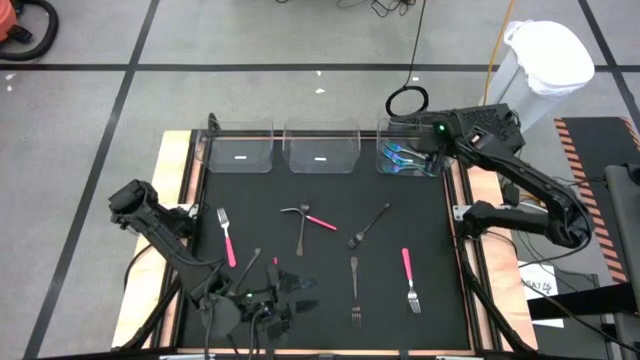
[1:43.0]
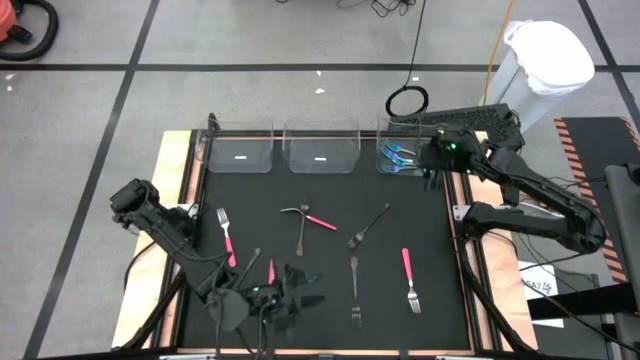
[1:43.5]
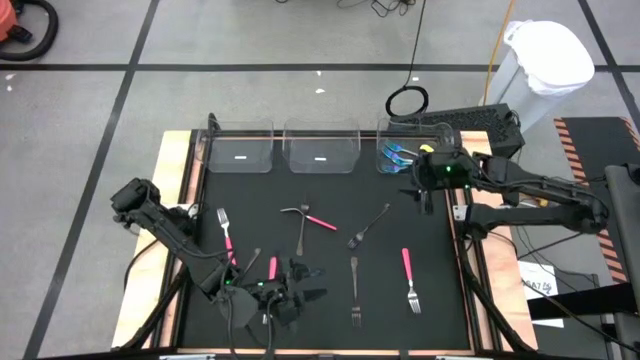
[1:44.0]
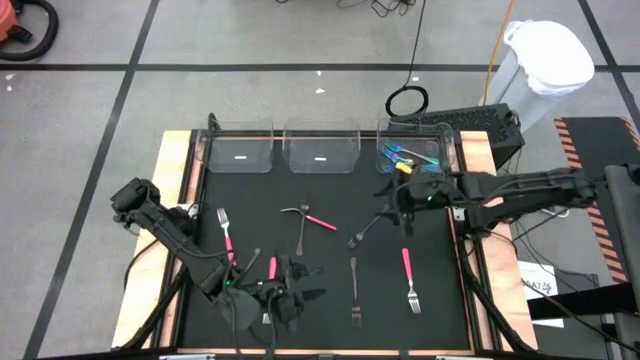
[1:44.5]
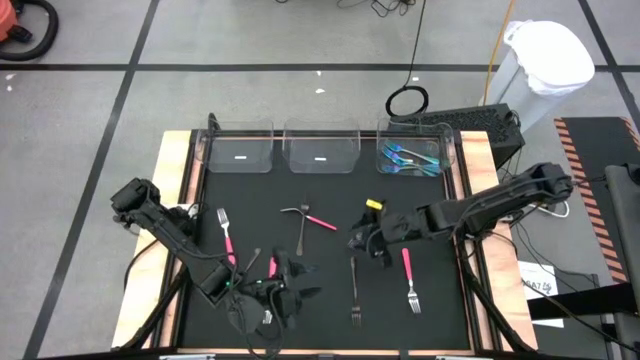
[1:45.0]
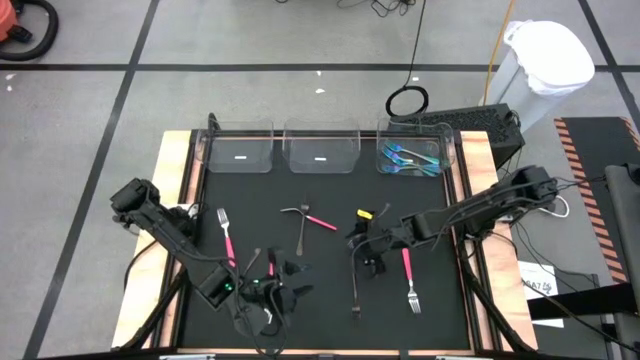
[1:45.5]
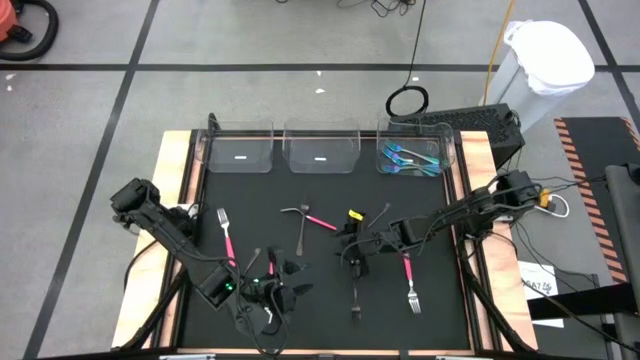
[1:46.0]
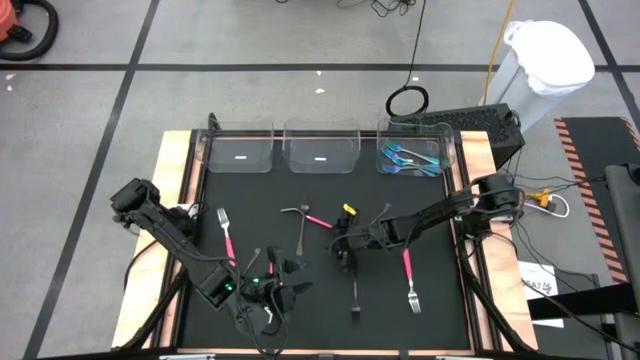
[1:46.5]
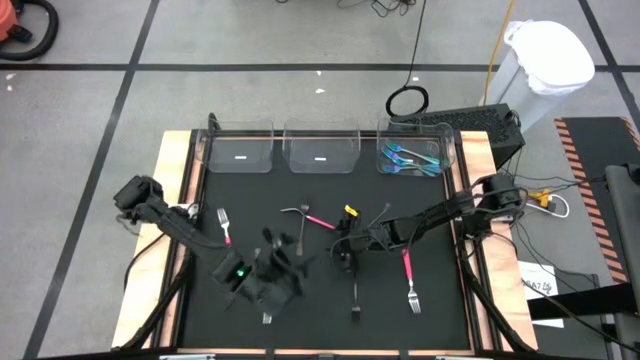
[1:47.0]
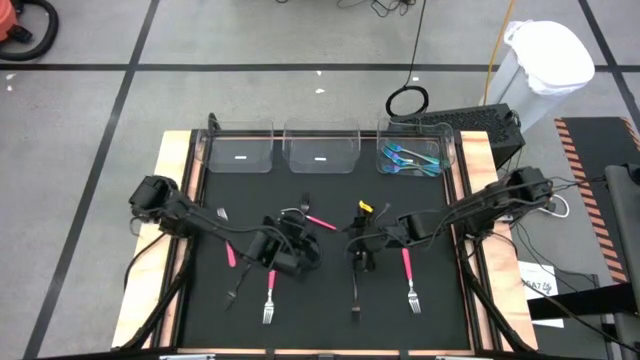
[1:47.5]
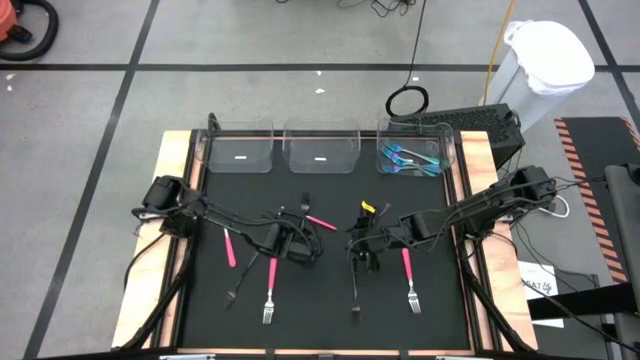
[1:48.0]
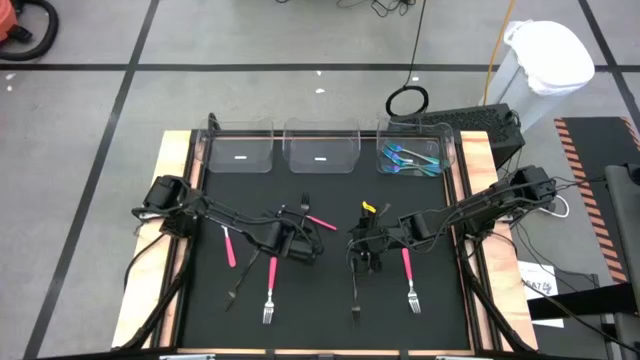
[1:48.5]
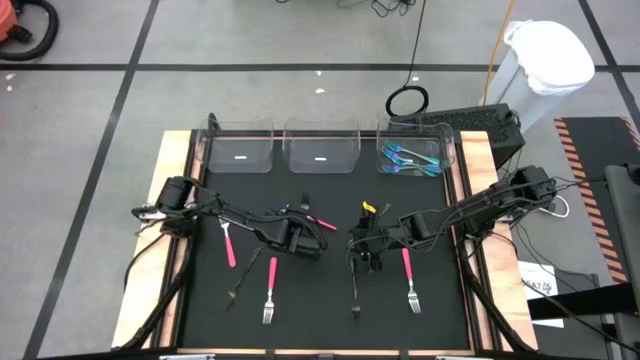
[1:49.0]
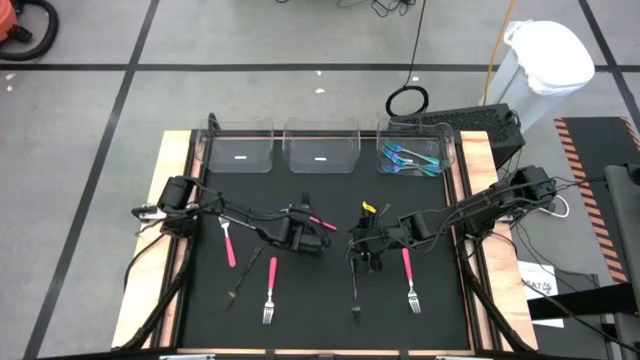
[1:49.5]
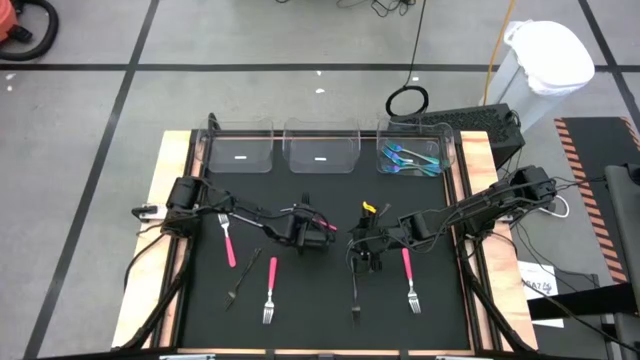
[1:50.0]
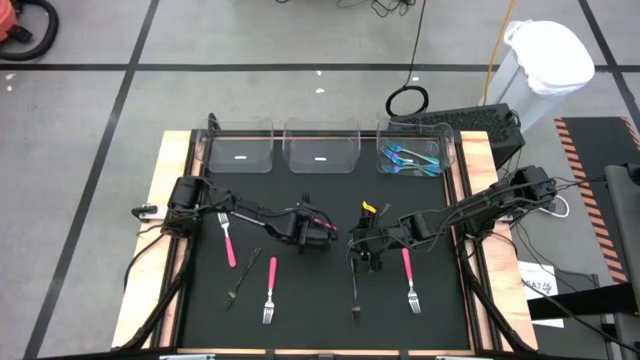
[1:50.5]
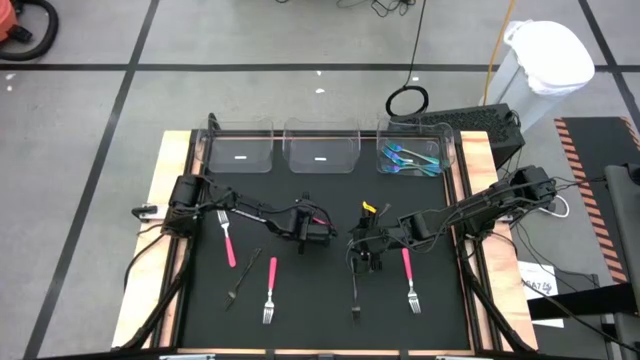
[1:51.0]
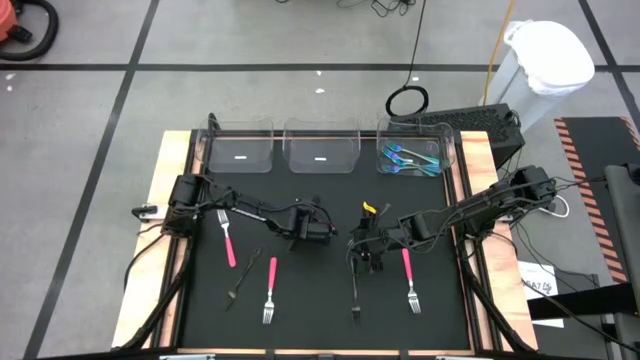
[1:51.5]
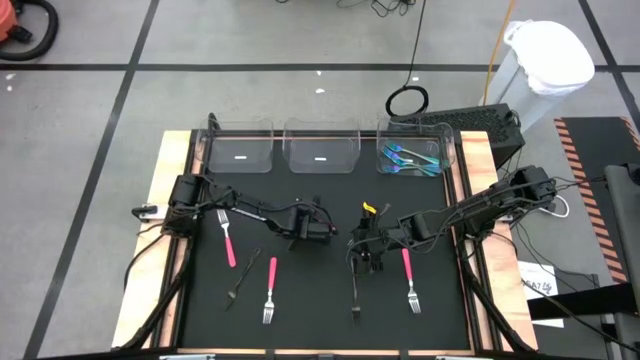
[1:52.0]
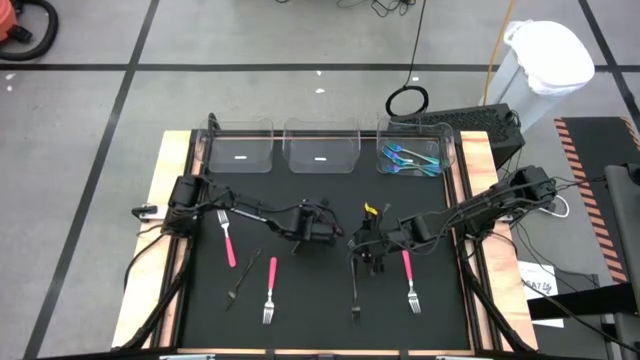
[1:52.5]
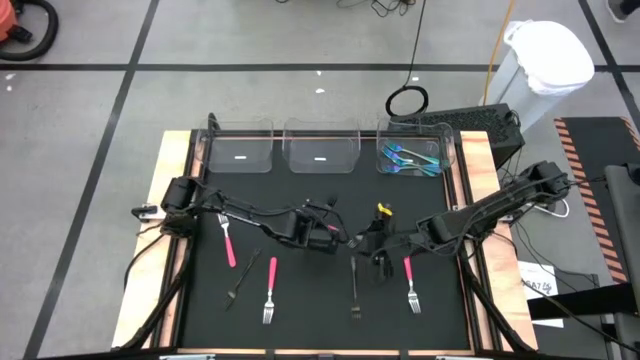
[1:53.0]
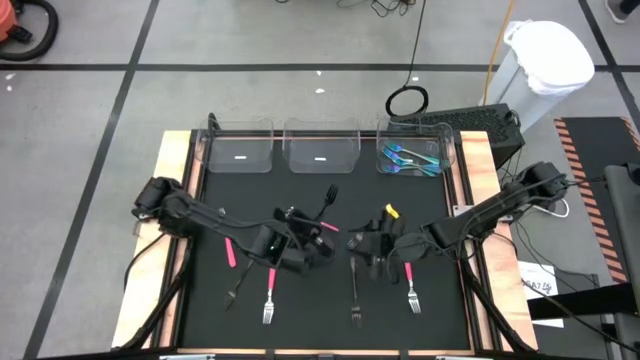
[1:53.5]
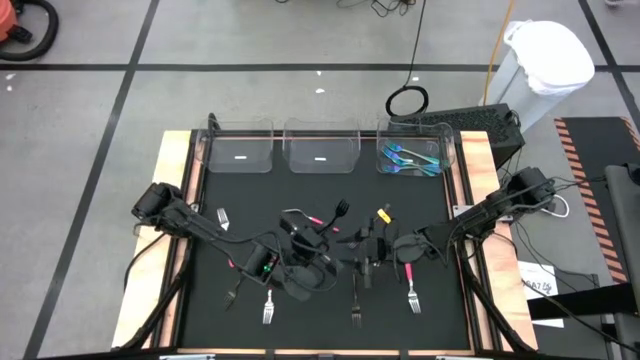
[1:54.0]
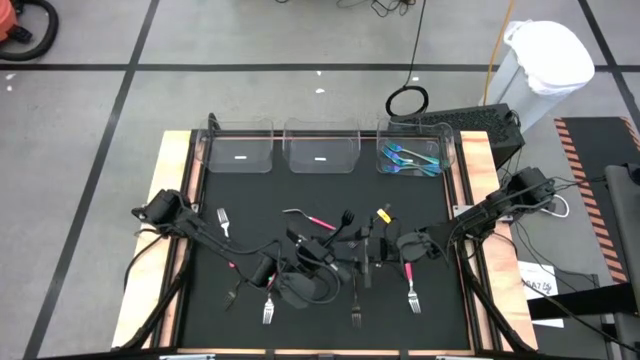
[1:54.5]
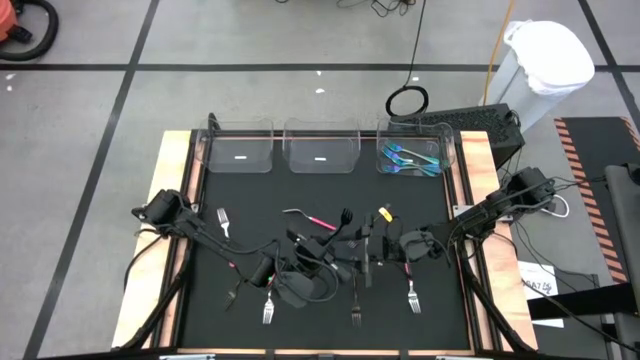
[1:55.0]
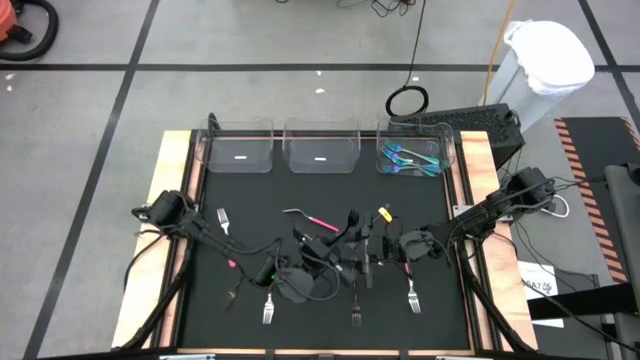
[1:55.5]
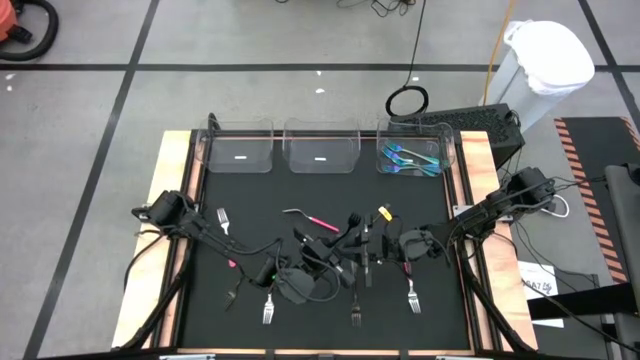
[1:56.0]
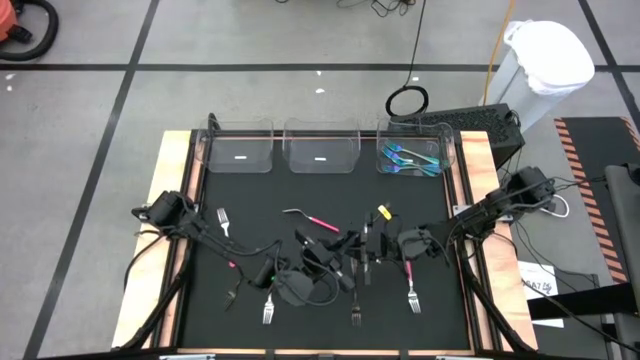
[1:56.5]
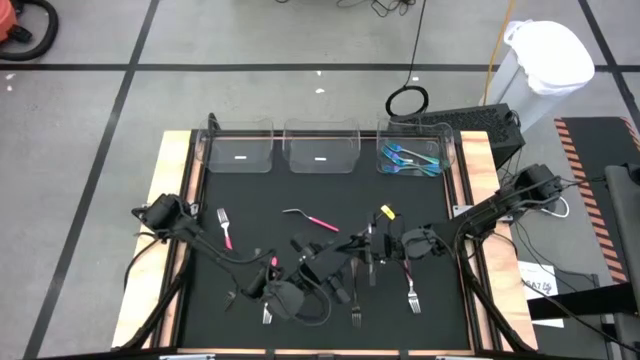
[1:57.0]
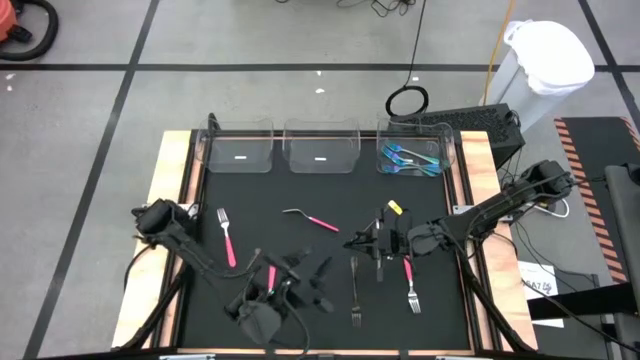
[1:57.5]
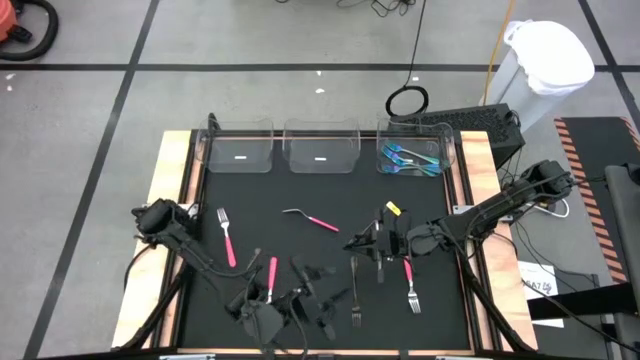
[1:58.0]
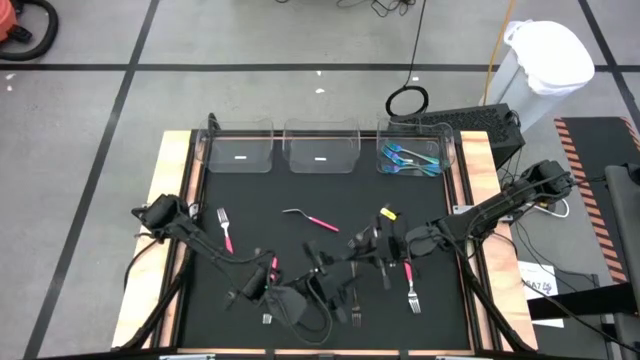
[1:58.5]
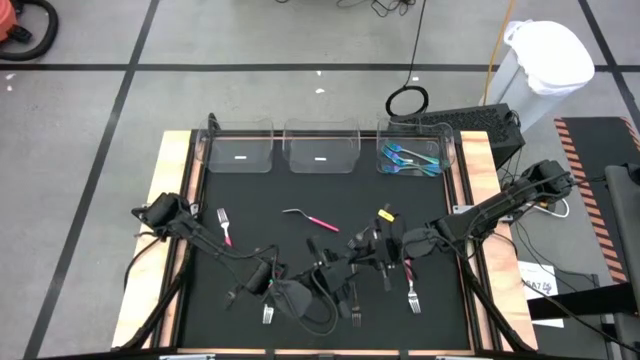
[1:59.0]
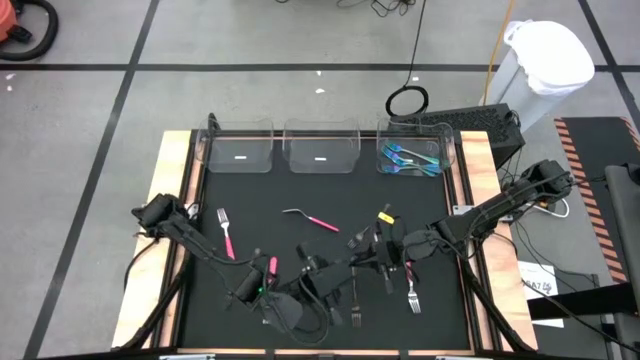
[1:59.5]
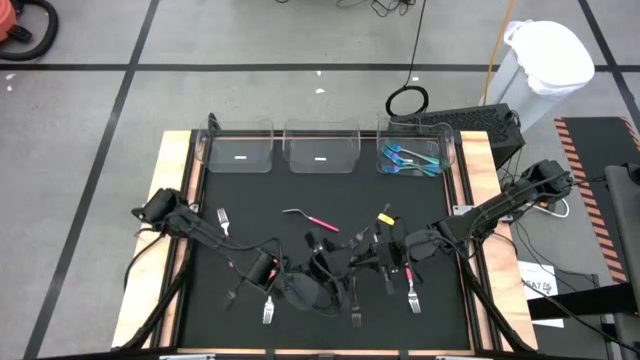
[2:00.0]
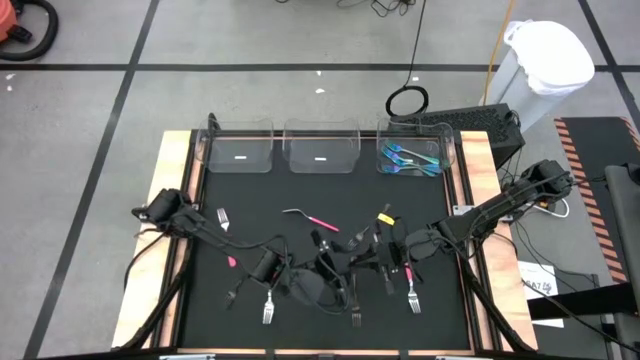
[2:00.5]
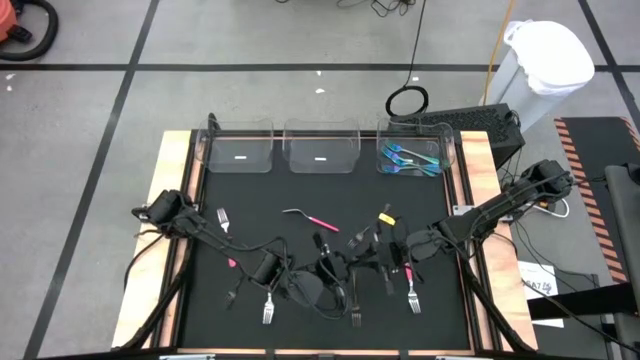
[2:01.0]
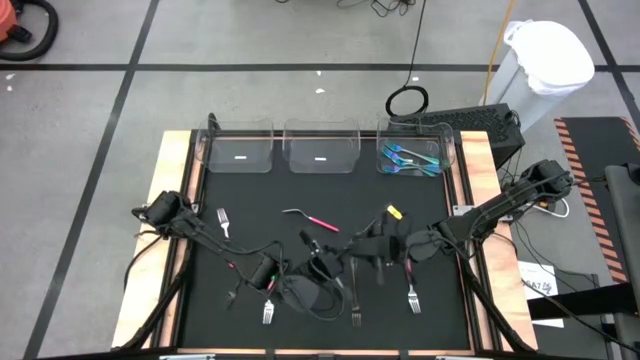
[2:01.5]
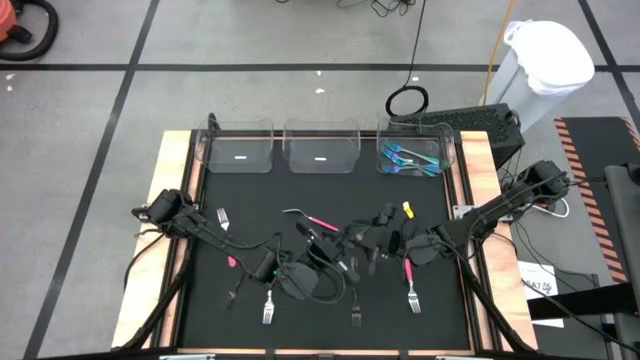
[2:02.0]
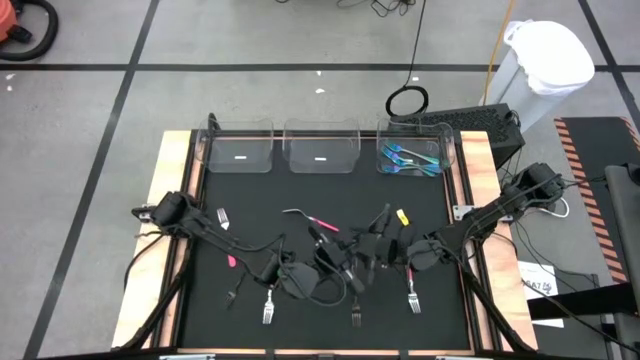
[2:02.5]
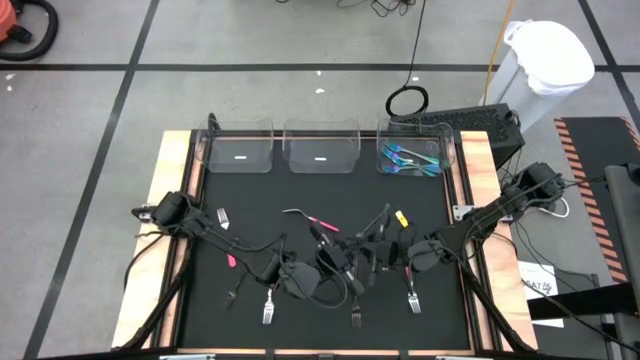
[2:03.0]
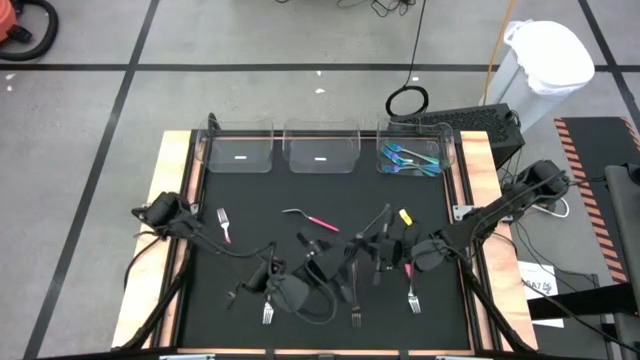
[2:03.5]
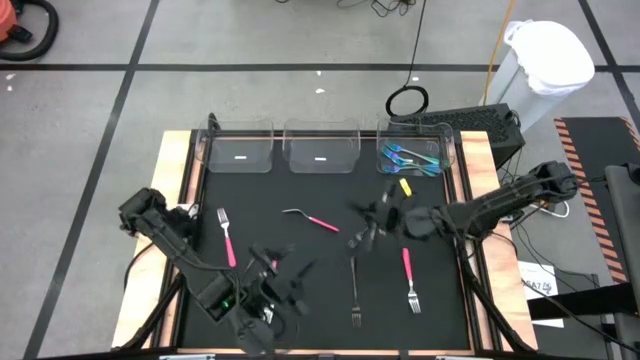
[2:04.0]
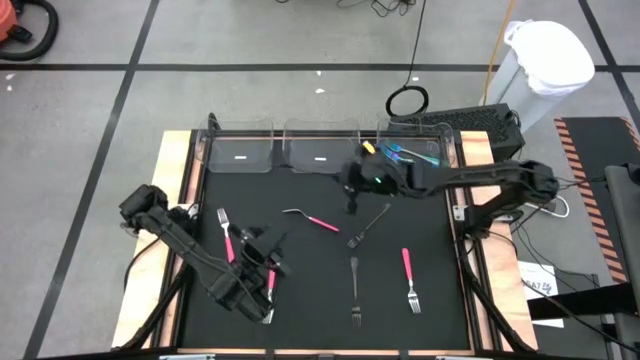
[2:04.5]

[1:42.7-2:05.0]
Task: Sort silverware by color (type)
Put the black fork into the middle transparent bin

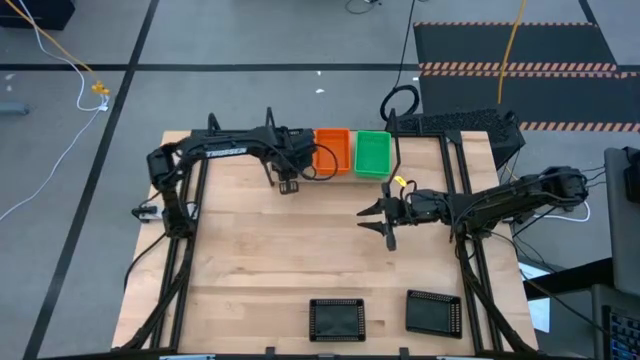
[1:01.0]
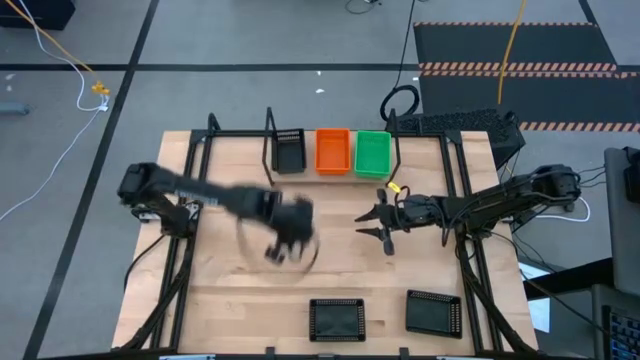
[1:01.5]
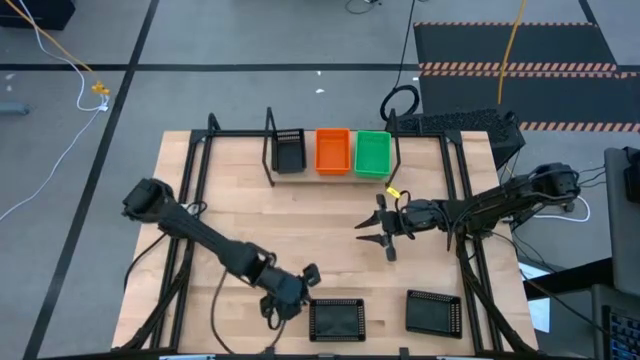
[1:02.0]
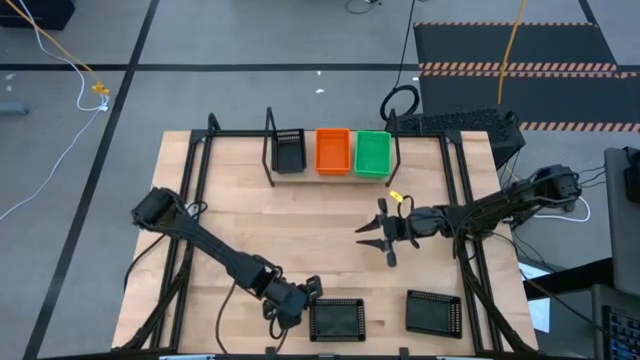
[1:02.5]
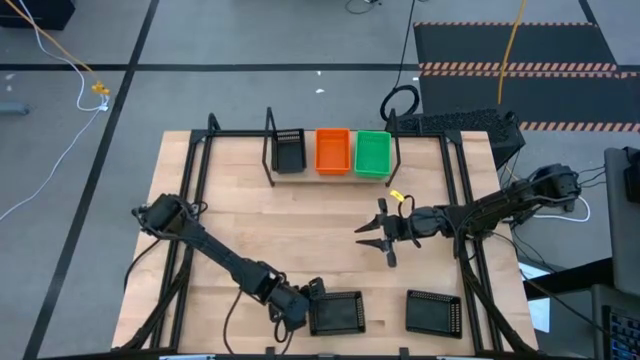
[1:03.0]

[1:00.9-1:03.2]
Task: Stack baskets on shelf by color
Stack the left black bin on top of the black bin on the shelf
